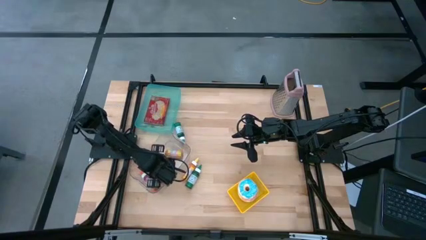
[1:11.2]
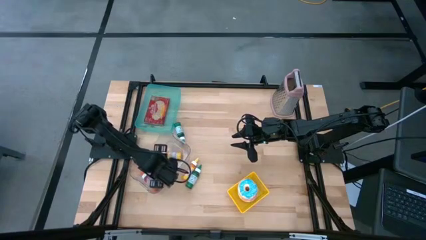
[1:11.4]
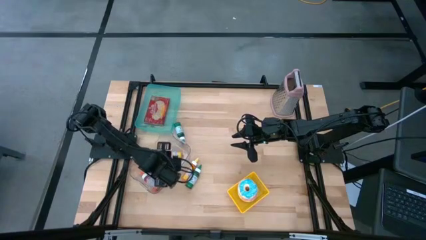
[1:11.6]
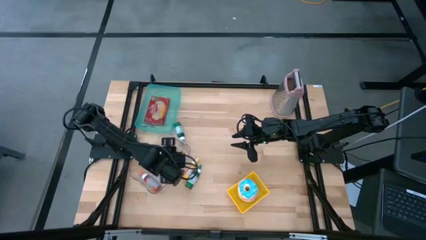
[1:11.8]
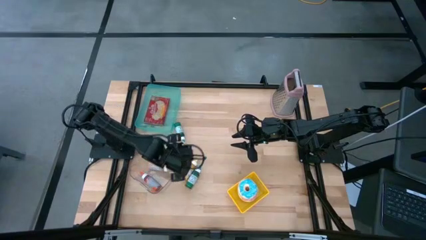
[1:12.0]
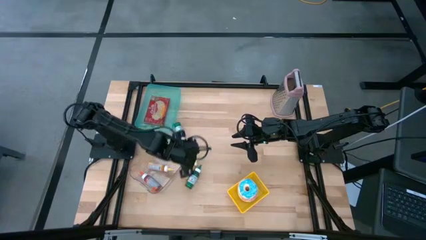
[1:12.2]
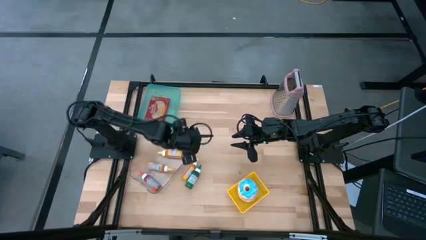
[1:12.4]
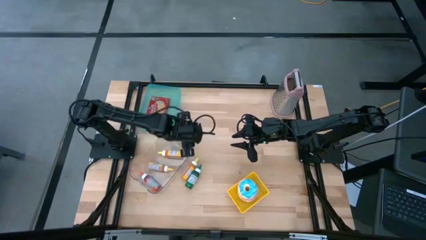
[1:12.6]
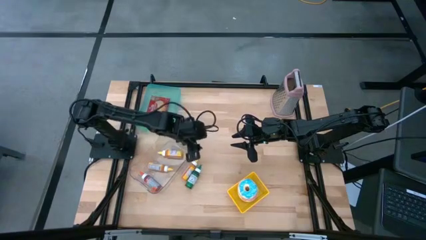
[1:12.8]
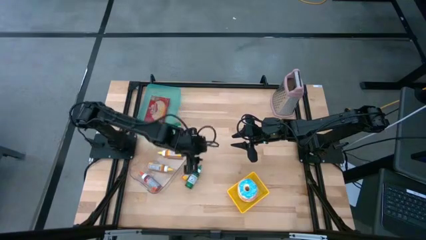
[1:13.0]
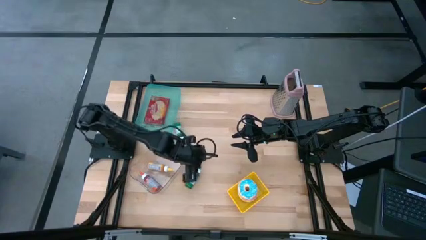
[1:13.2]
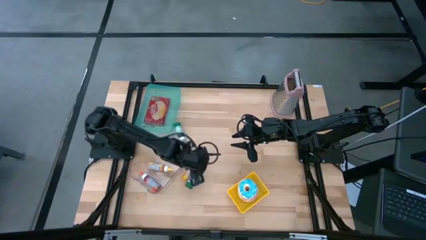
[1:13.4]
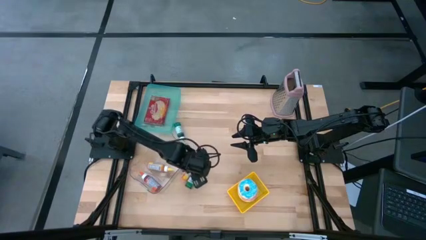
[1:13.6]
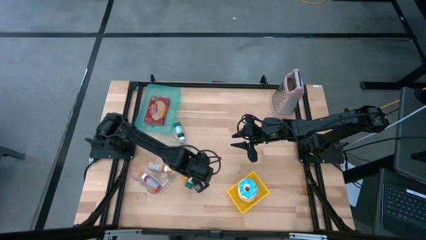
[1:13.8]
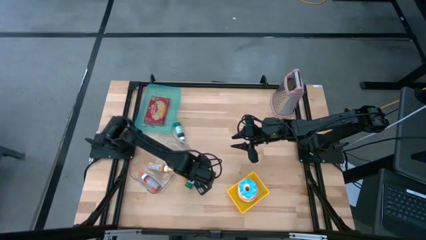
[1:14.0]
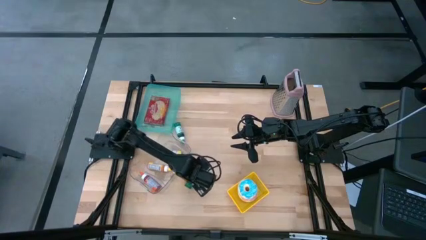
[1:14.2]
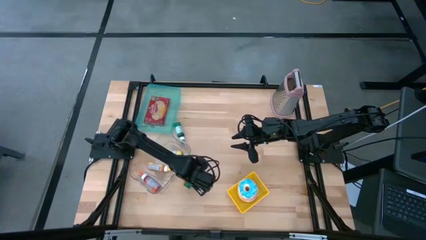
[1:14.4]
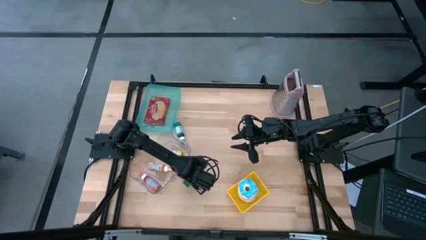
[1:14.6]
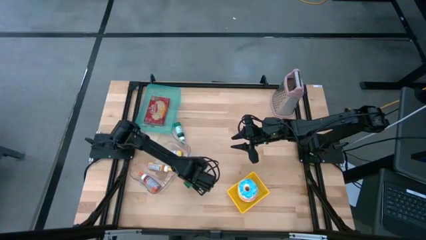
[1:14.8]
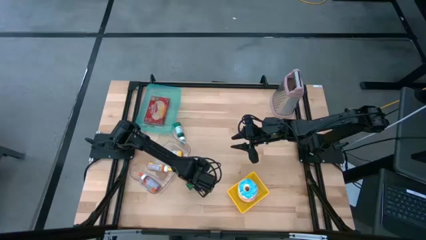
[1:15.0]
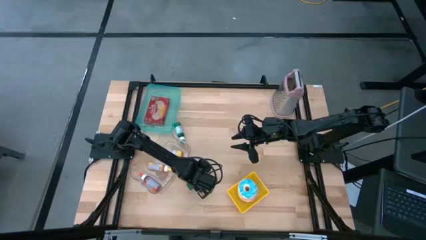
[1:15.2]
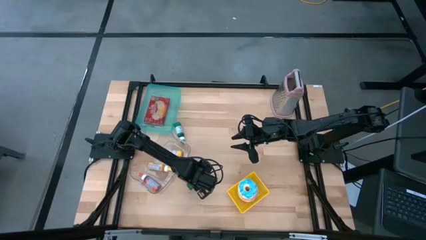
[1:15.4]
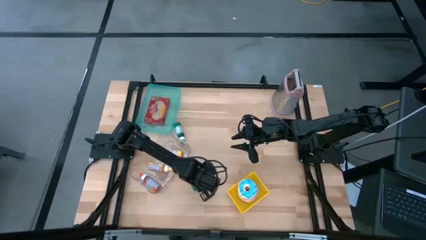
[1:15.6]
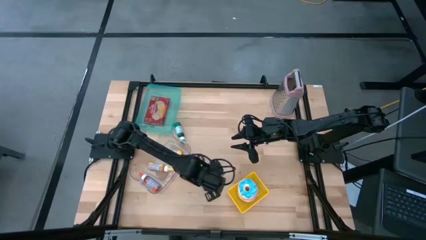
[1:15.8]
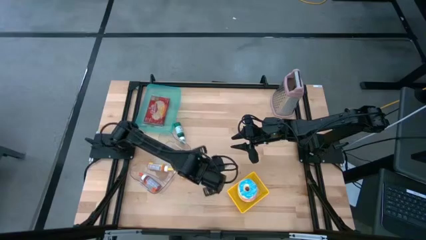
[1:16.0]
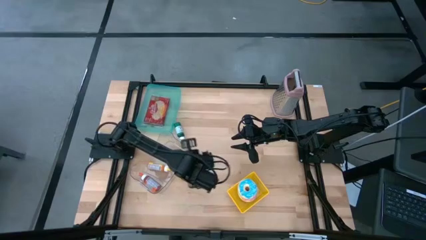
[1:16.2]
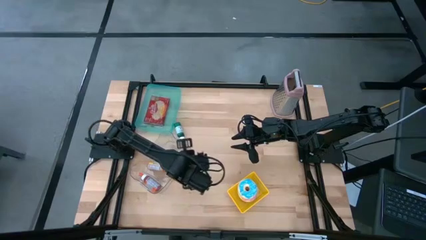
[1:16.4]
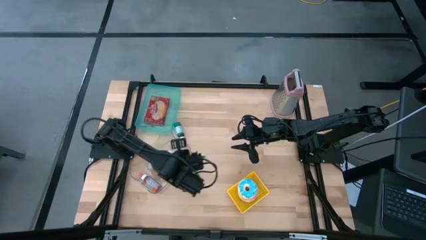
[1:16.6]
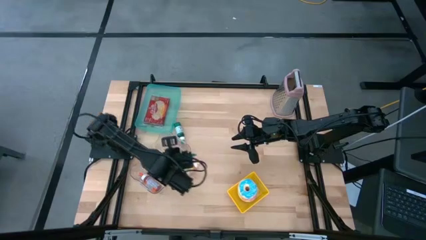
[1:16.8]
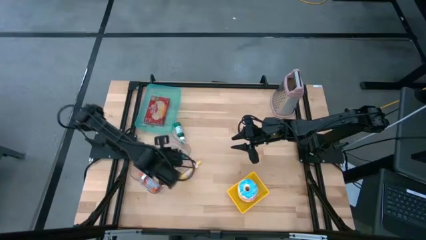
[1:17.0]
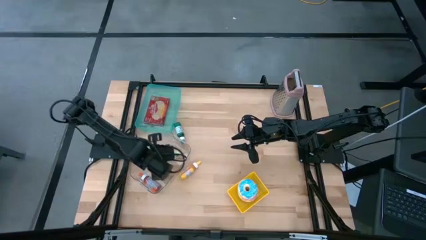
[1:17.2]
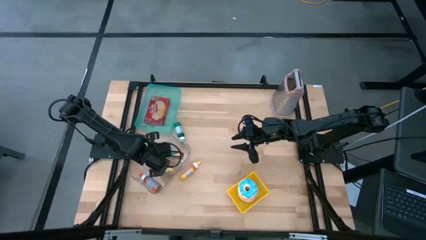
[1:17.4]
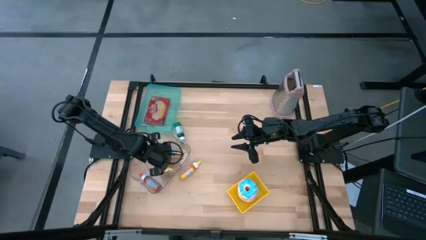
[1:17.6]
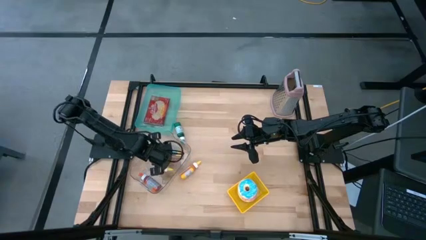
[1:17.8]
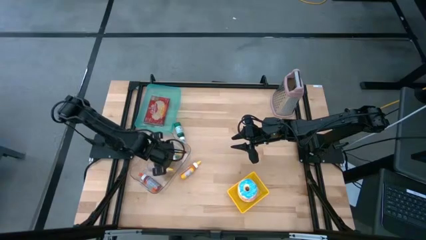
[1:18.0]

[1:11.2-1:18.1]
Put the bottom green food coloring bottle into the transparent bin

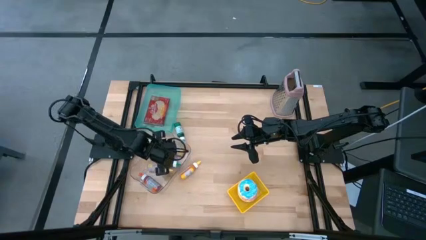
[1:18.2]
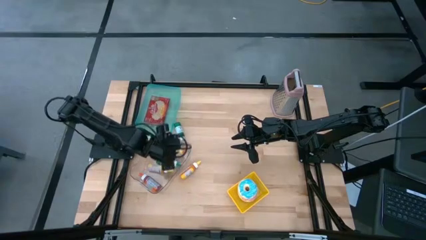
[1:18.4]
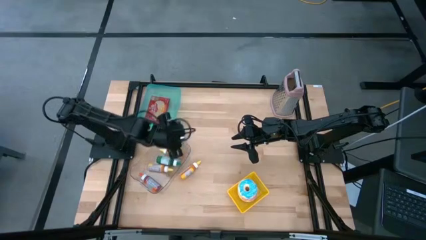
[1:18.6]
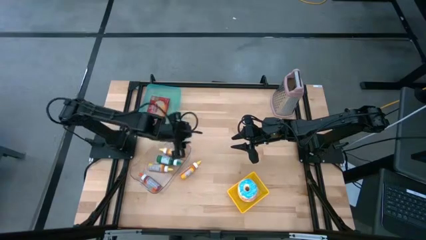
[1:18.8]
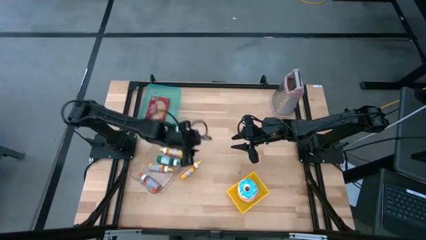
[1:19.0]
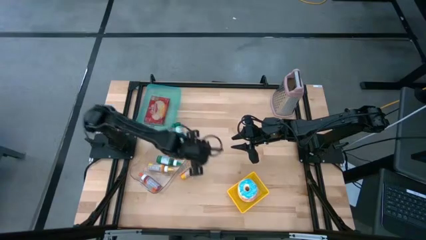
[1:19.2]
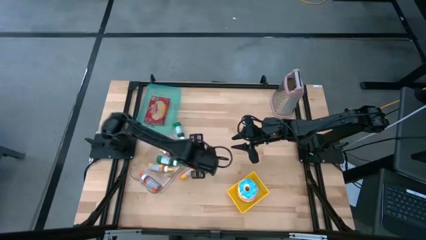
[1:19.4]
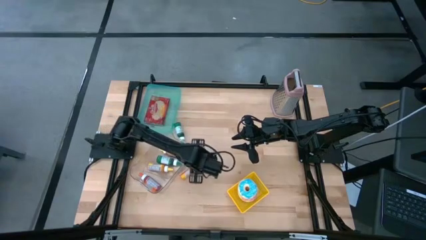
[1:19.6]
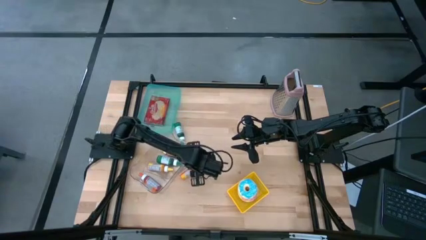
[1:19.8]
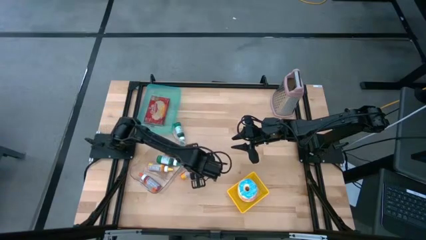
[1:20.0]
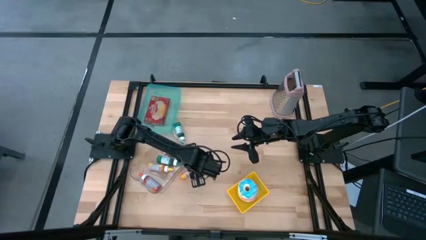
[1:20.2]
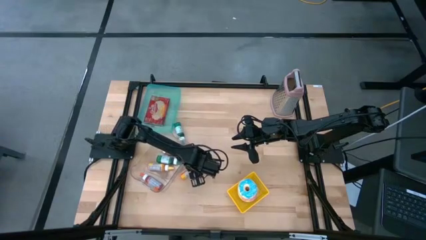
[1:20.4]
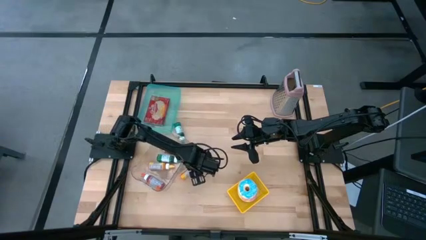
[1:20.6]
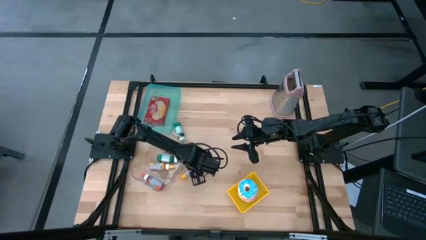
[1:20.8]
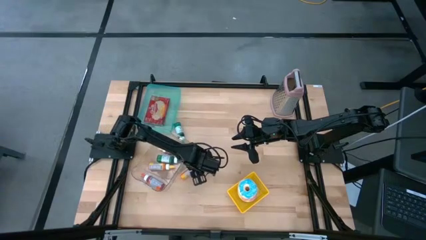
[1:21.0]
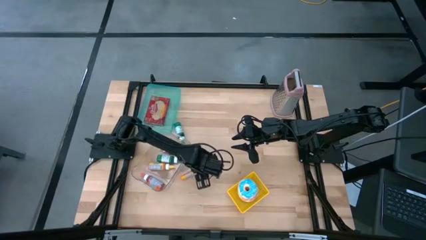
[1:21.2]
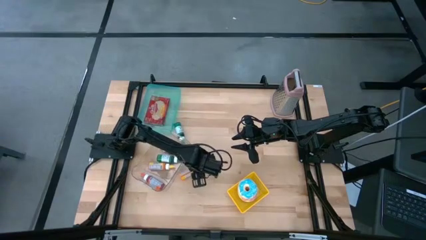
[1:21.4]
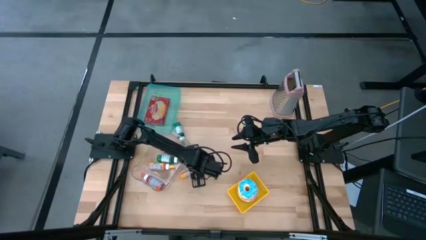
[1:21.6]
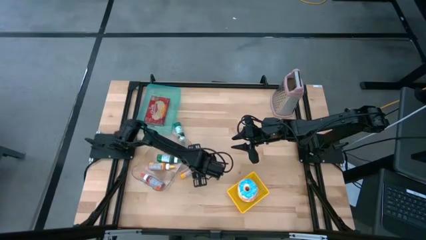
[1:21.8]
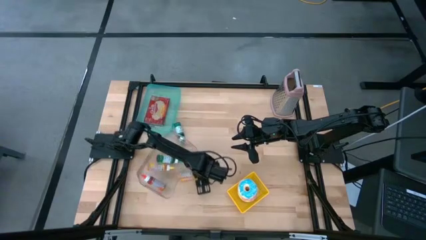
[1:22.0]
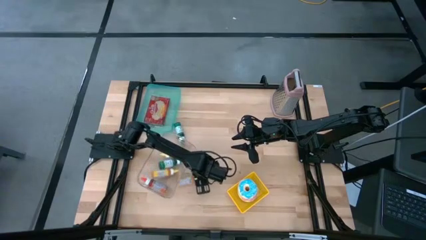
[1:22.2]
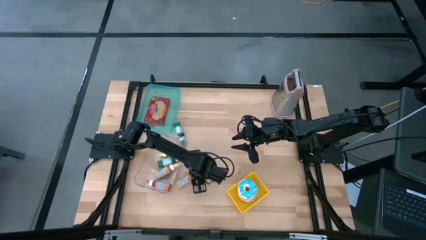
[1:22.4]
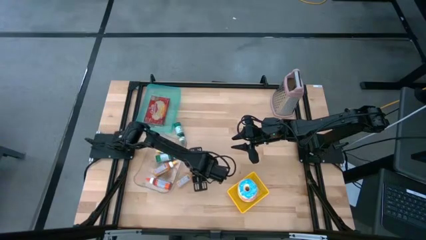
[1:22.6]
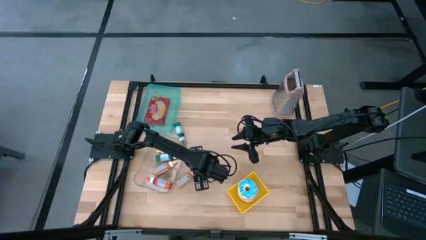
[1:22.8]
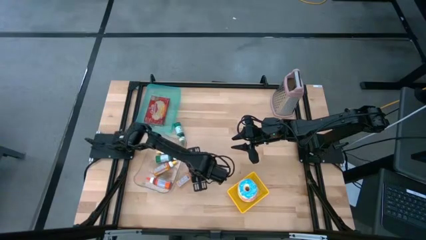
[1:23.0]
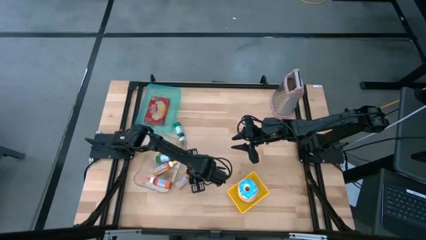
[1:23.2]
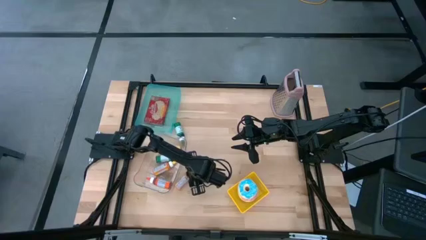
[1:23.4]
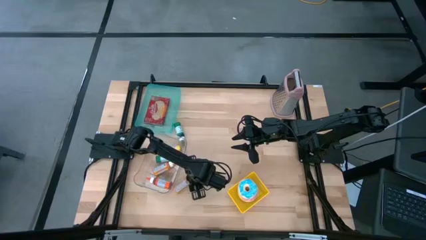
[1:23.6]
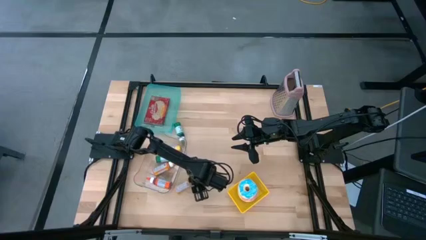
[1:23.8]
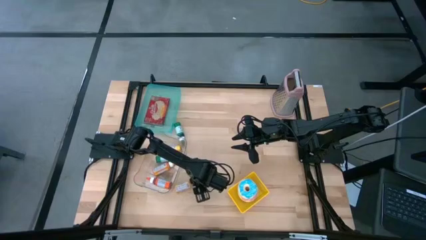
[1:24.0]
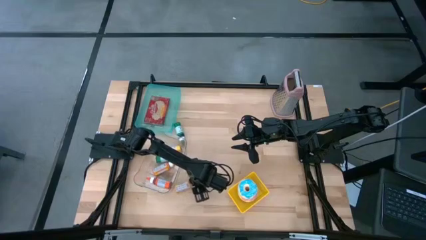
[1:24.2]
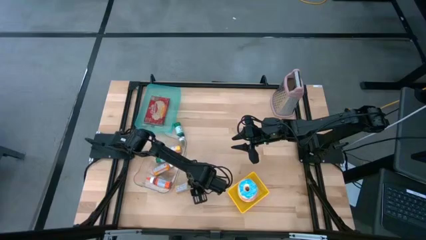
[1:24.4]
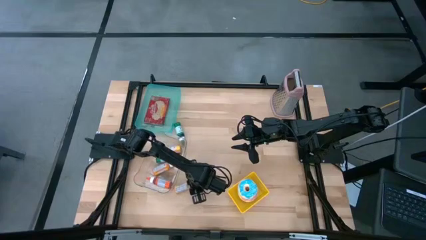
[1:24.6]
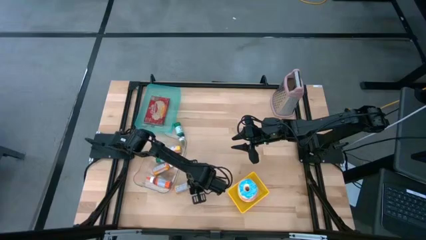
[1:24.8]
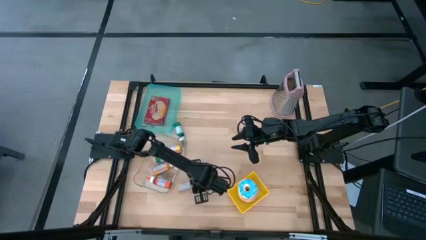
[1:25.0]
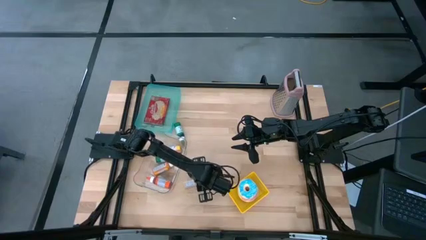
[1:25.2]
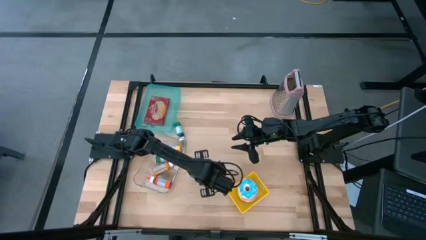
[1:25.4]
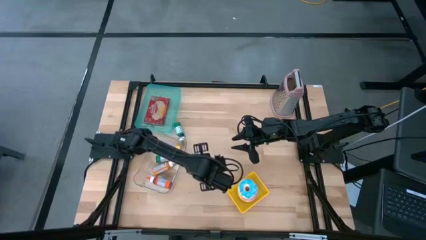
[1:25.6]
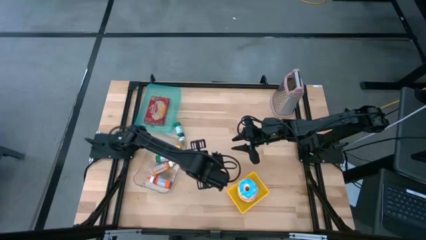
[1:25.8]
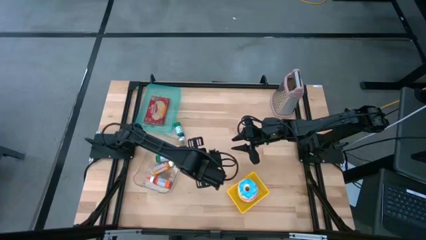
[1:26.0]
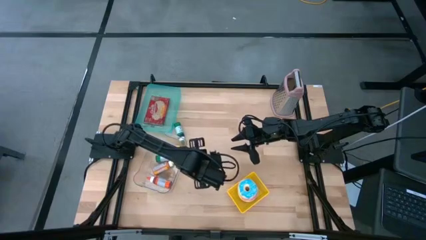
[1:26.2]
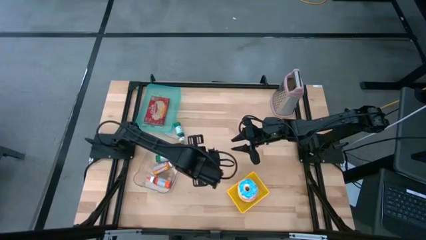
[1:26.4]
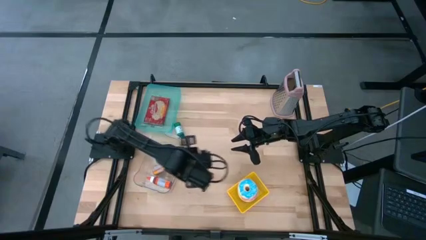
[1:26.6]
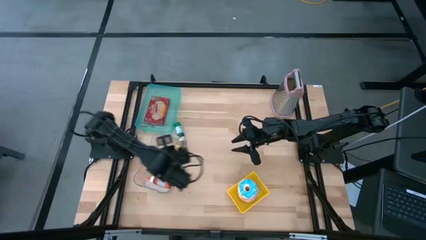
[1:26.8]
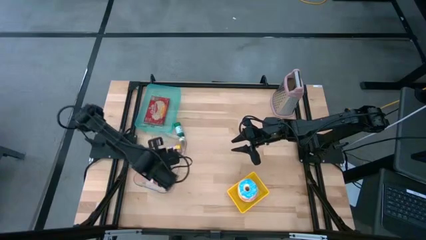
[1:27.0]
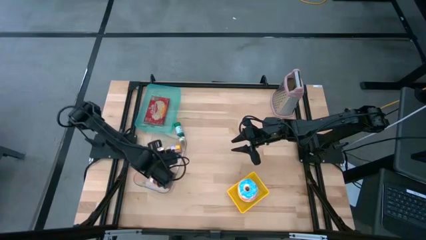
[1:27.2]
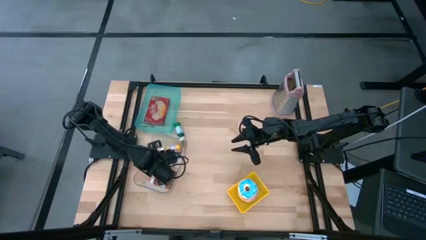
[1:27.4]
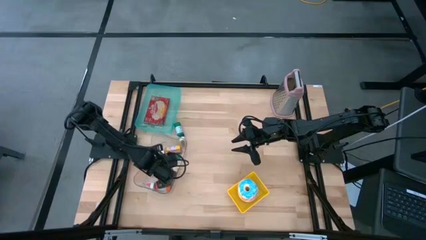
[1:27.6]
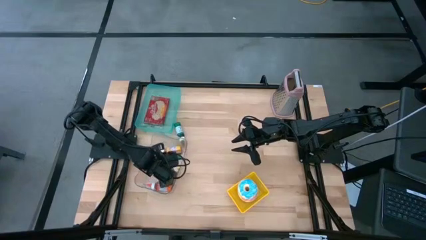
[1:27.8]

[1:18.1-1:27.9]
Put the yellow food coloring bottle into the transparent bin
